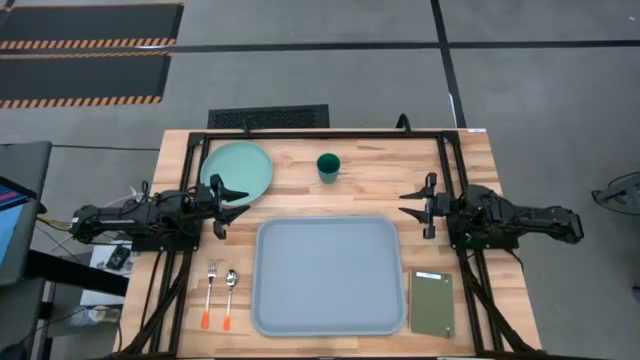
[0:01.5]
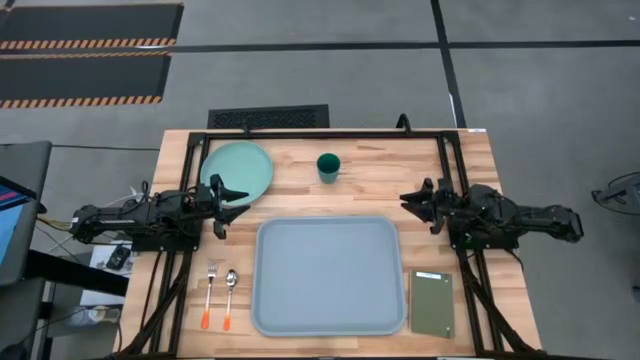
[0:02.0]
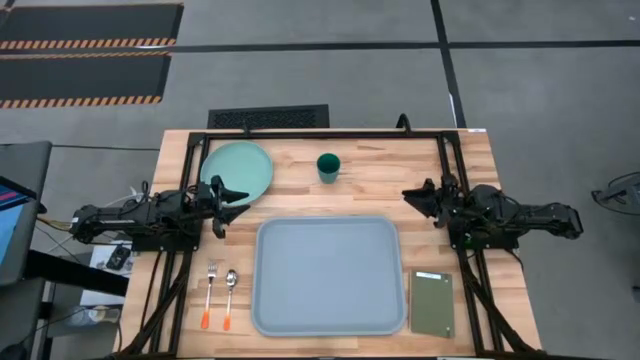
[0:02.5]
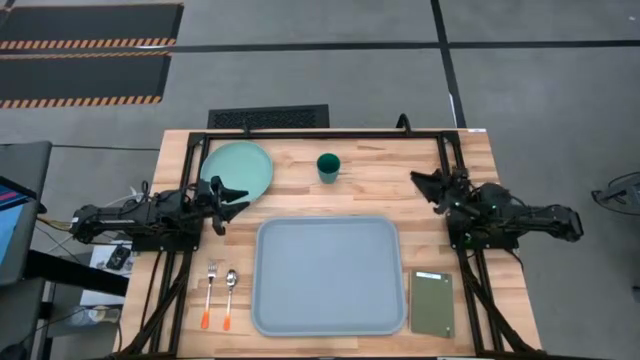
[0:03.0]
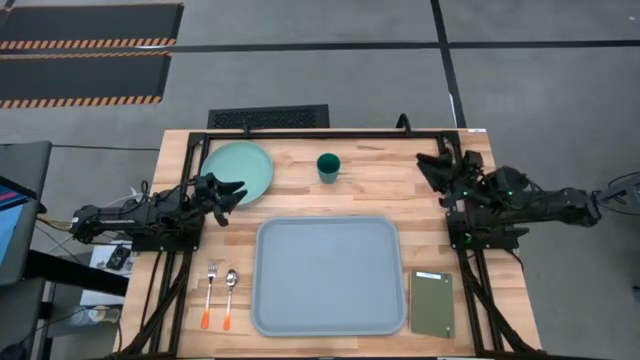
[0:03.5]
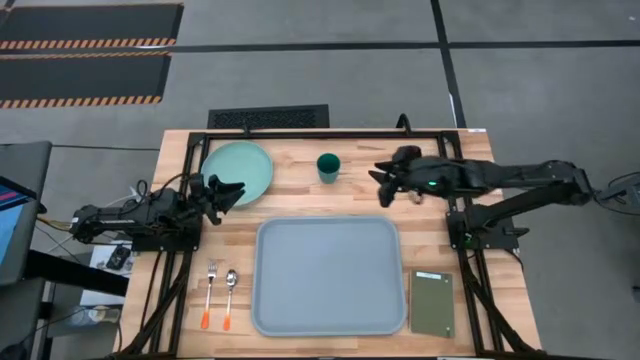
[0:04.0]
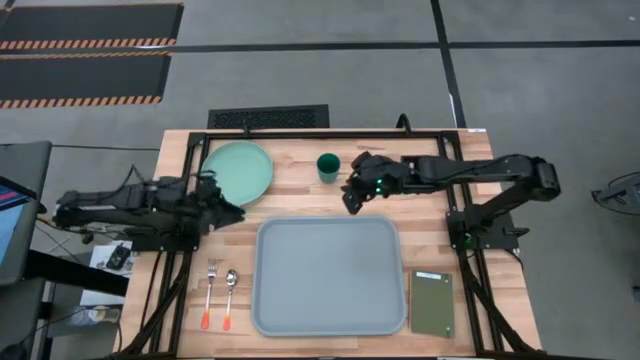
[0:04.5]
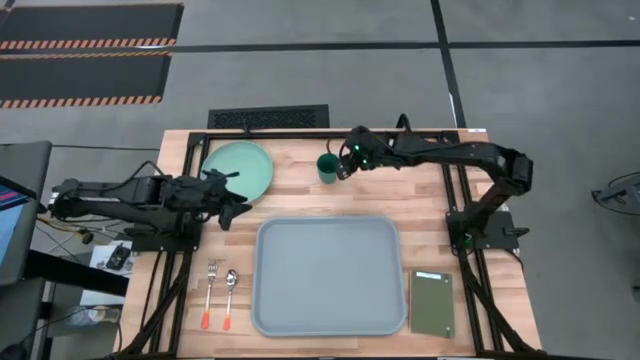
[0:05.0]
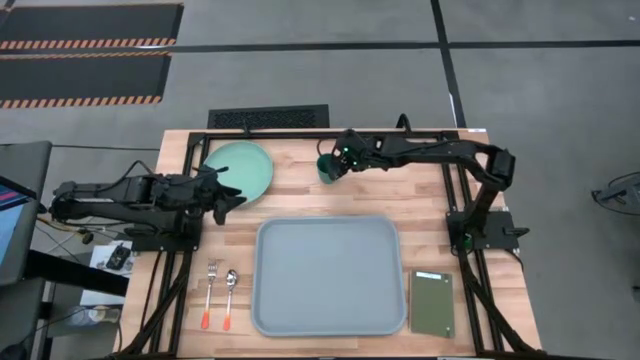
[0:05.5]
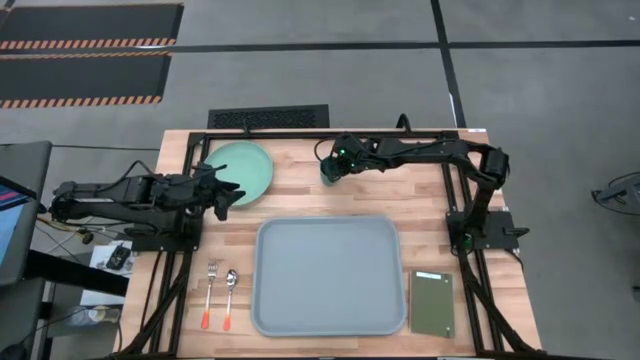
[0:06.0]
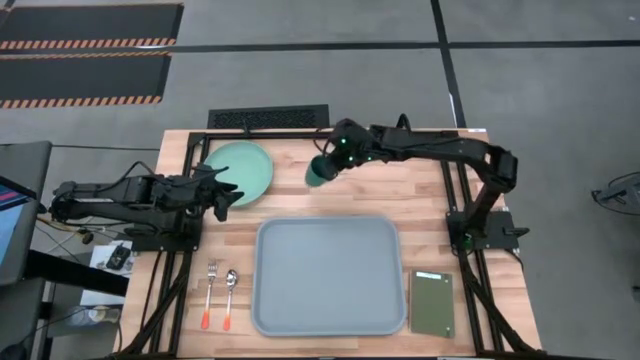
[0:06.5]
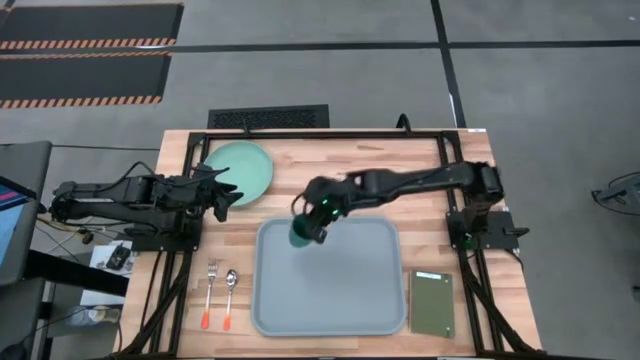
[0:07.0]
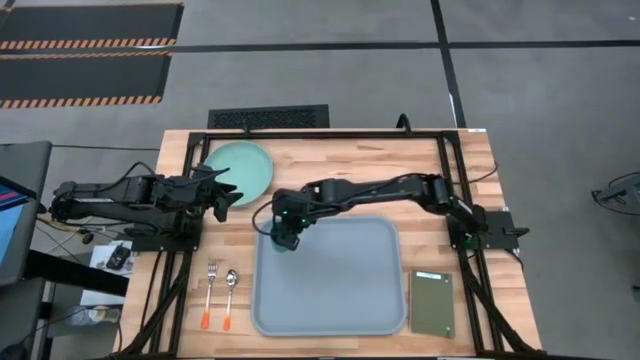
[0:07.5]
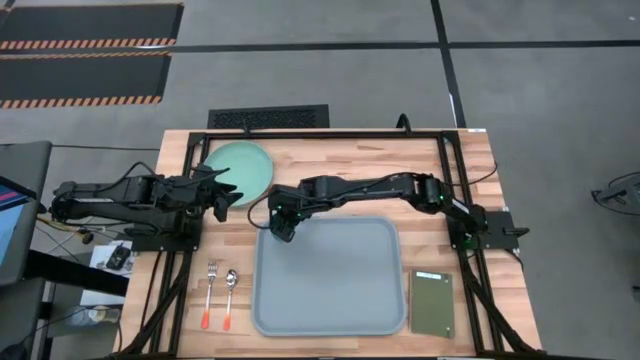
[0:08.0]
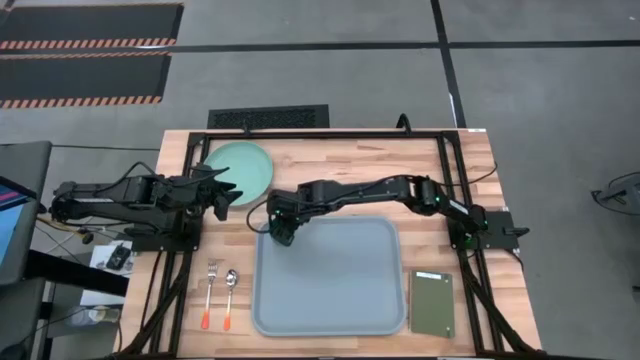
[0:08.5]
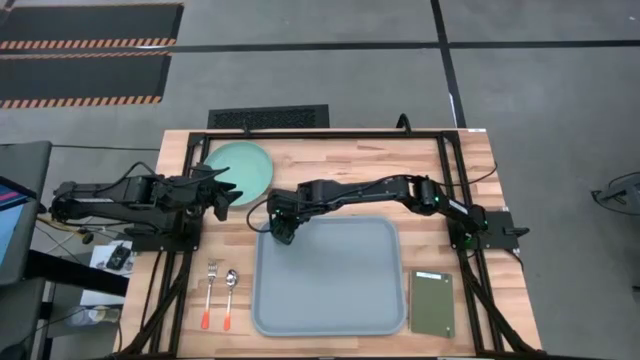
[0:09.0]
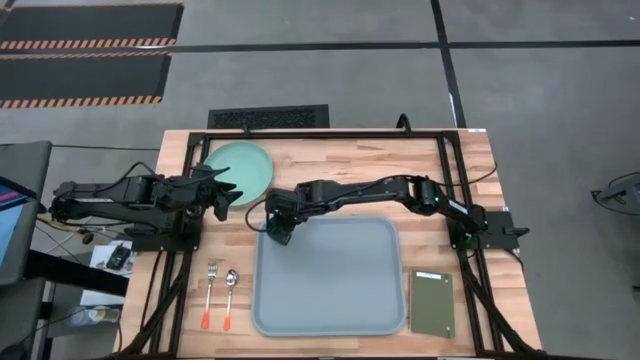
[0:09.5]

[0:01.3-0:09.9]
Task: Pick and place plate/cup/fork/spoon on tray
Put the green cup on the top right of the gray tray

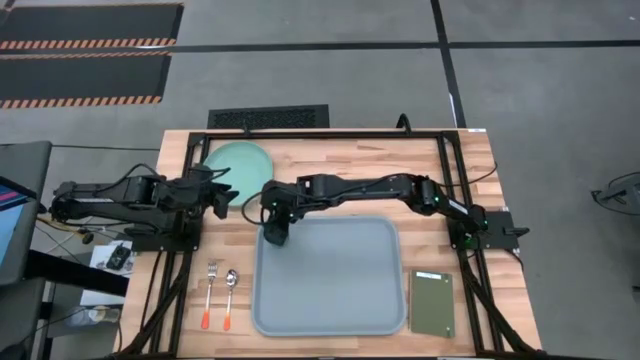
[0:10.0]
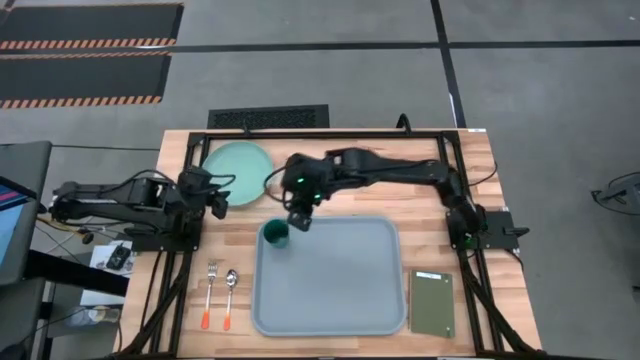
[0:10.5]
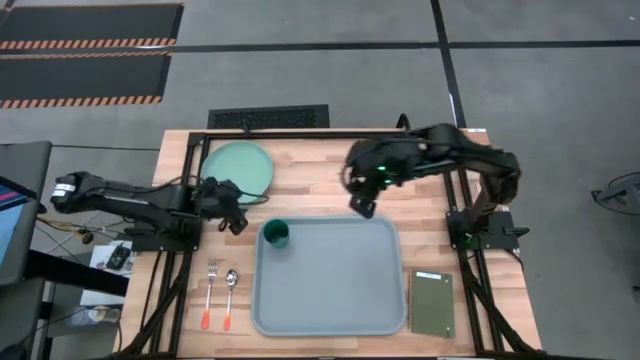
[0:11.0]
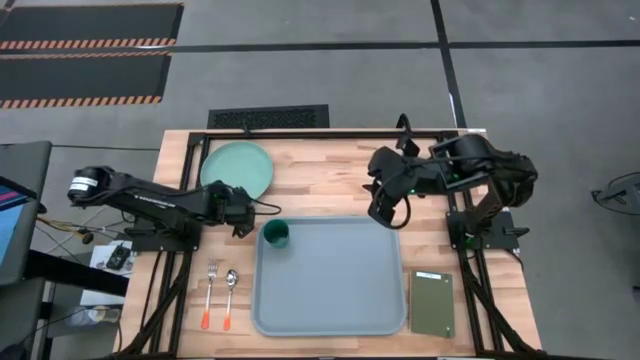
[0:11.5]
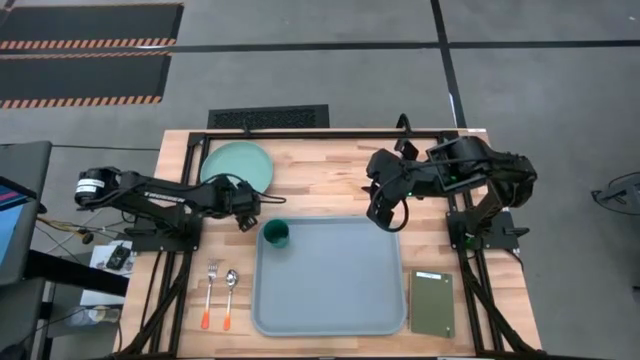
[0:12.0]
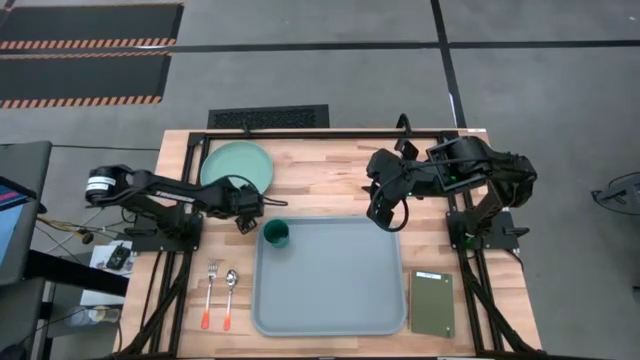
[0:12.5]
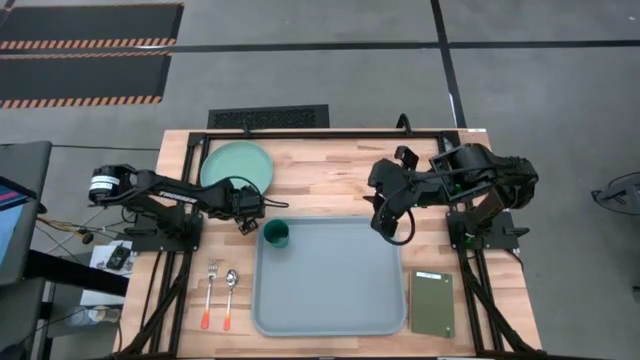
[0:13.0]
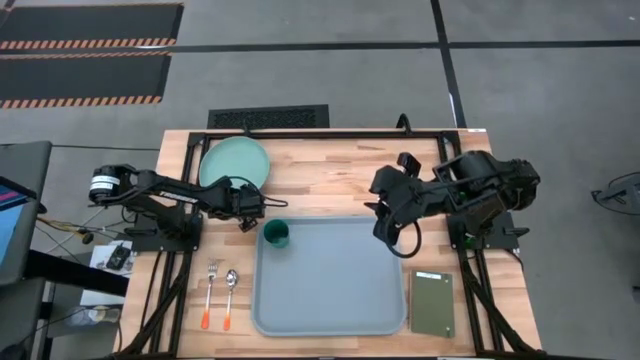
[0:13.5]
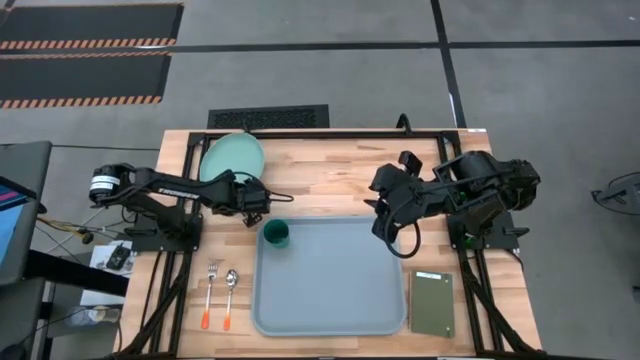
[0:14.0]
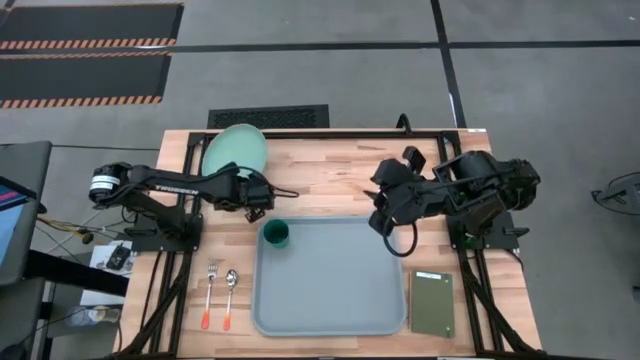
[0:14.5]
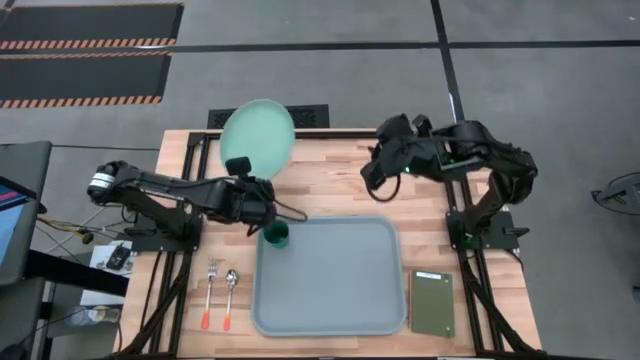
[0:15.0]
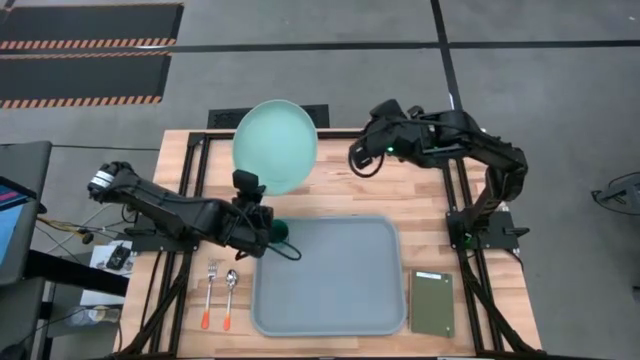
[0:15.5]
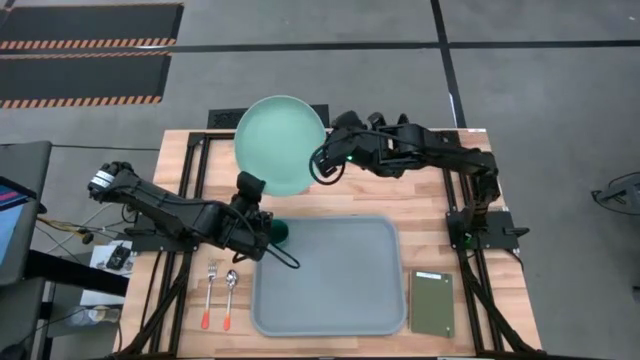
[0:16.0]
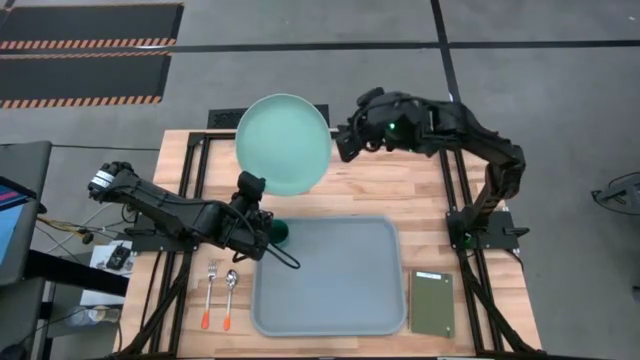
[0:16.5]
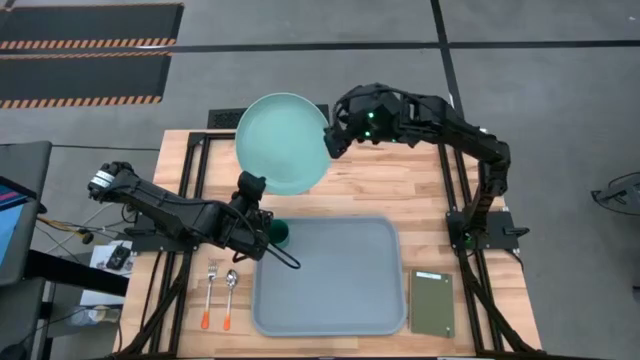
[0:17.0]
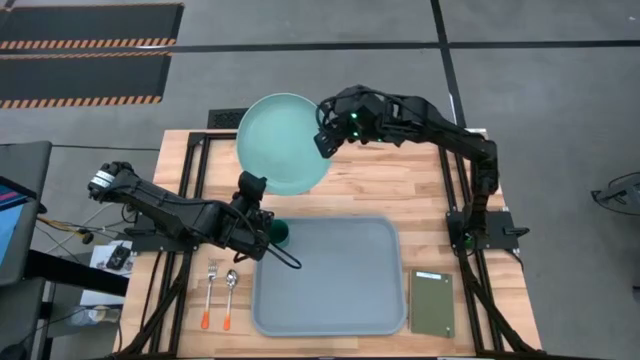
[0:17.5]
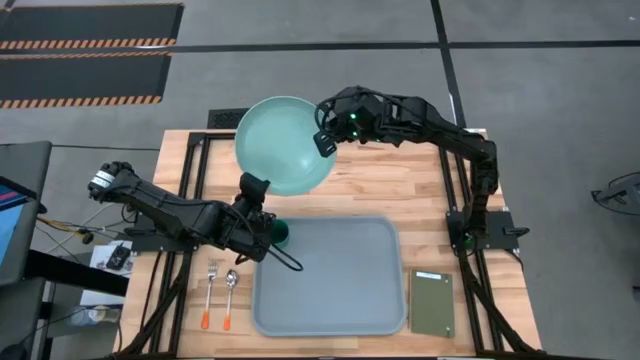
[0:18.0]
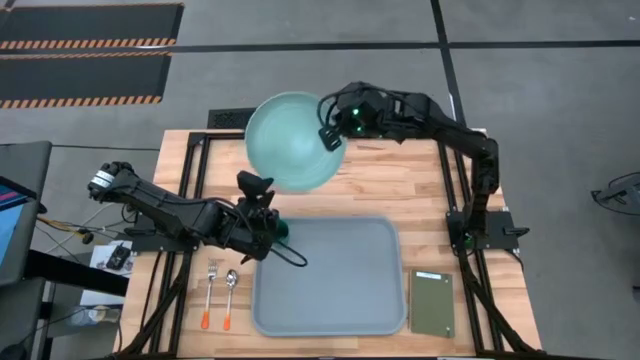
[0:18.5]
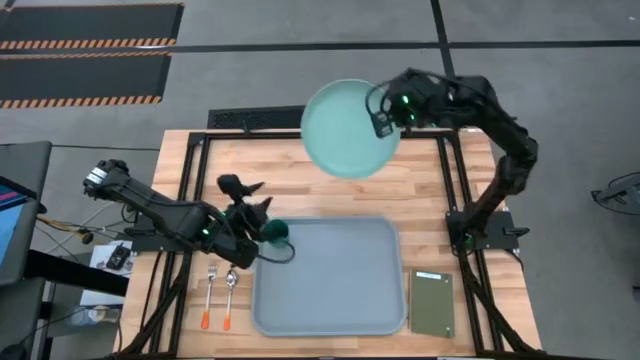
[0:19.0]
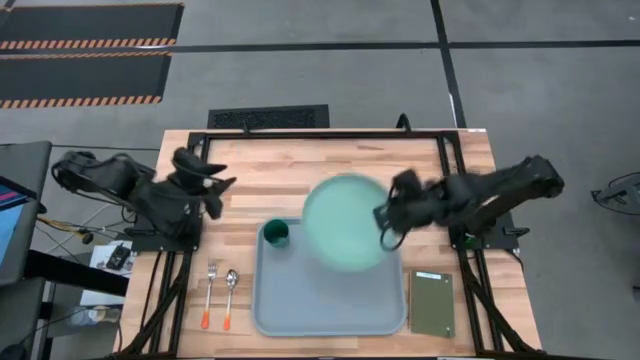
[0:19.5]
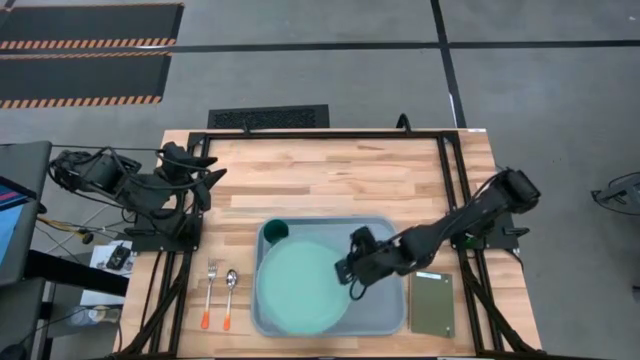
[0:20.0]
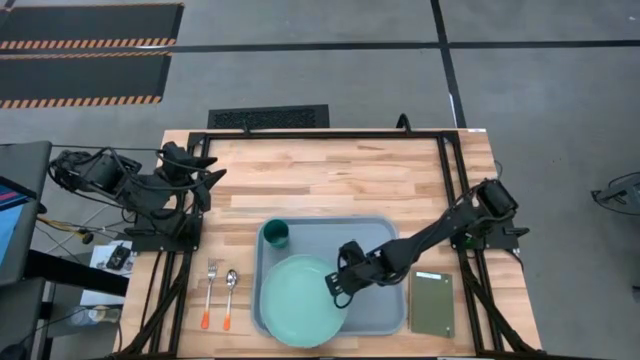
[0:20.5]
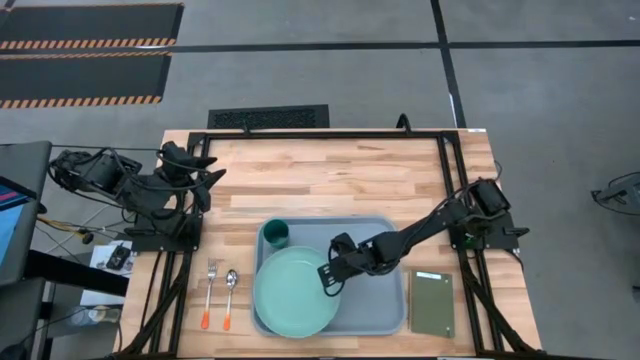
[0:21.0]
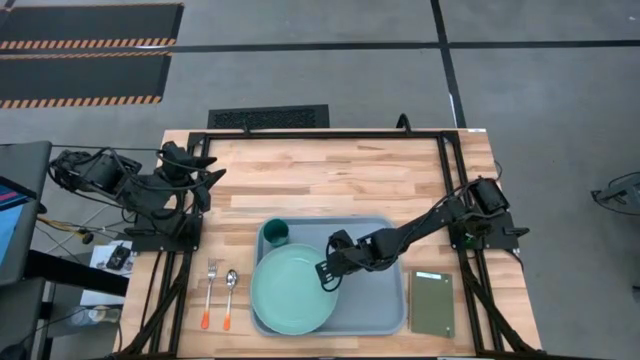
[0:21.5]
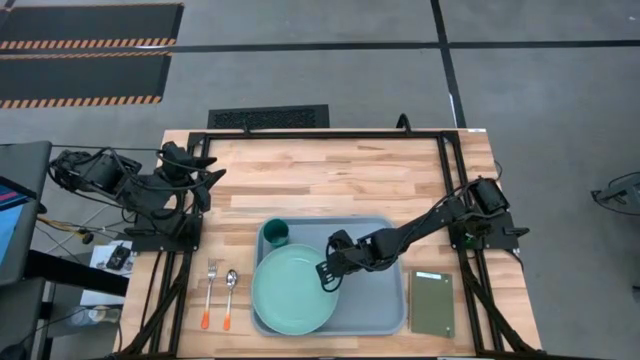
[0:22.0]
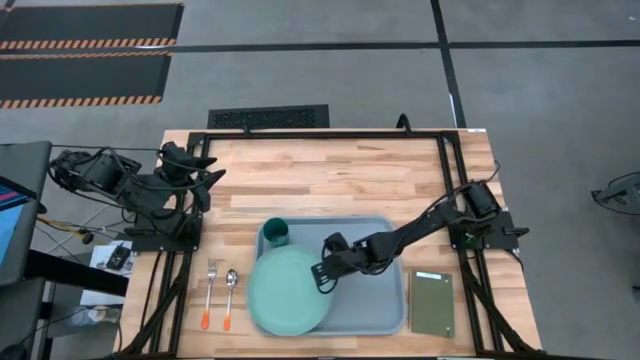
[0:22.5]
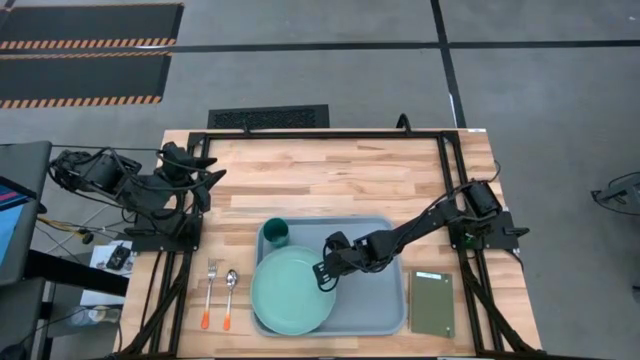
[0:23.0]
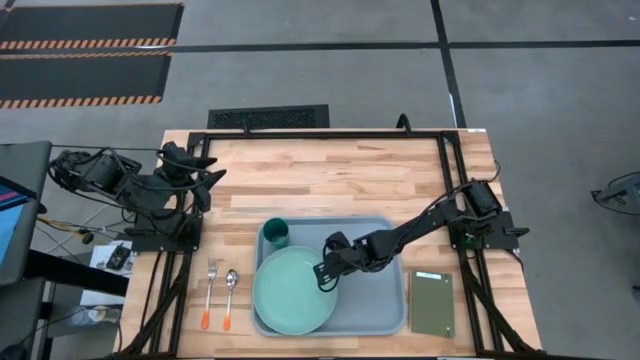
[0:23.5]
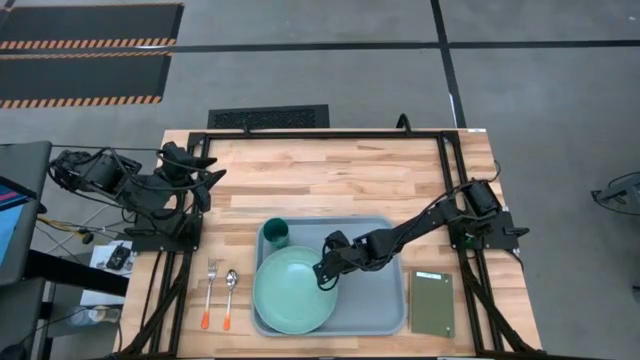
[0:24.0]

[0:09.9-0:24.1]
Put the blue plate on the gray tray below the green cup
